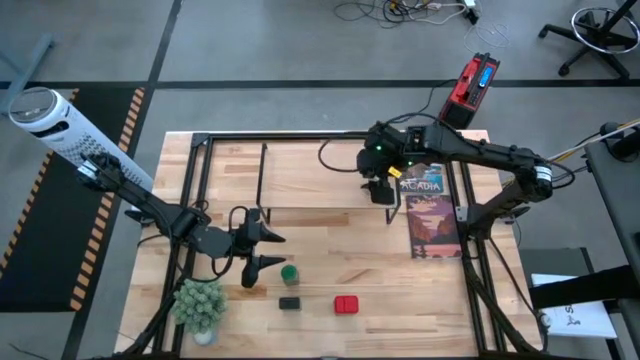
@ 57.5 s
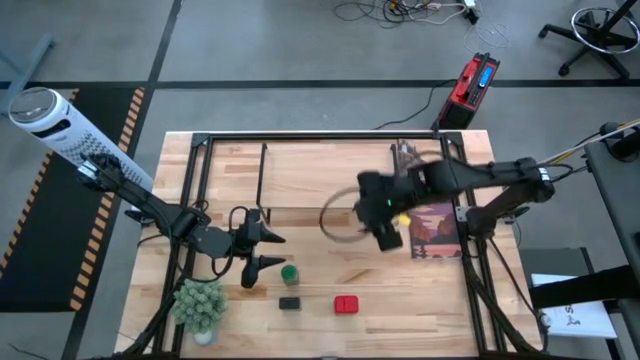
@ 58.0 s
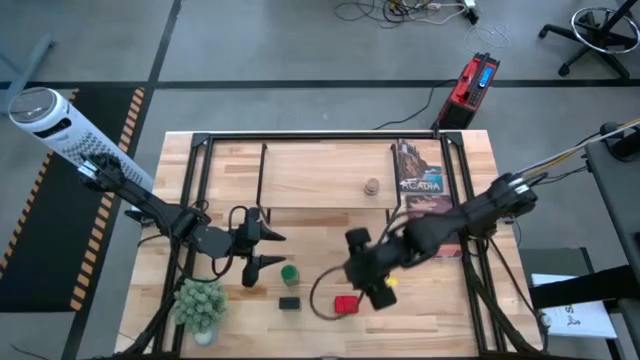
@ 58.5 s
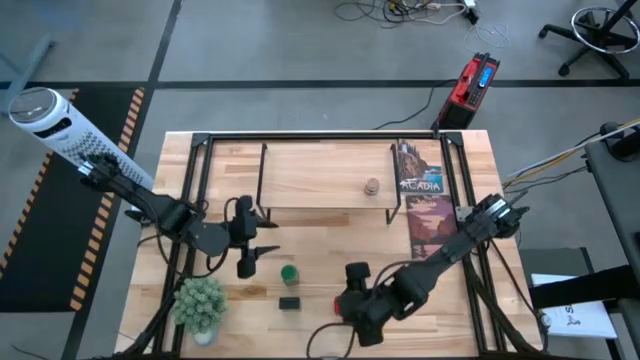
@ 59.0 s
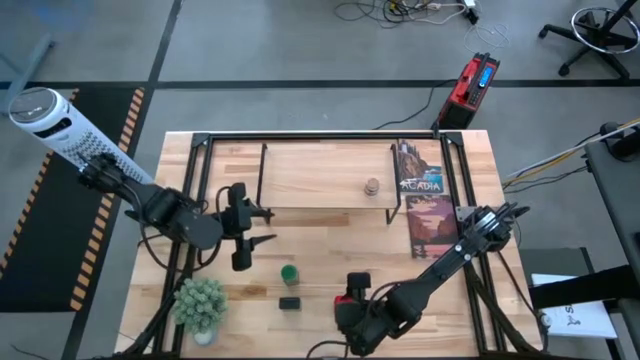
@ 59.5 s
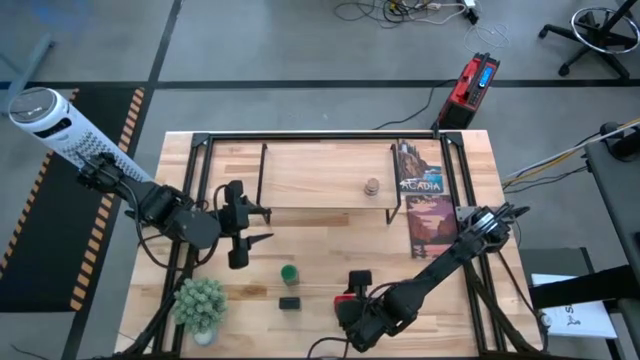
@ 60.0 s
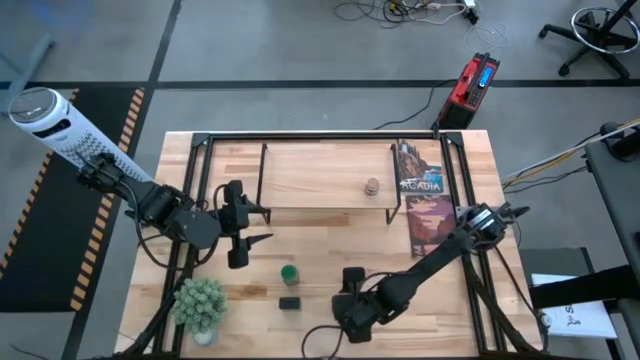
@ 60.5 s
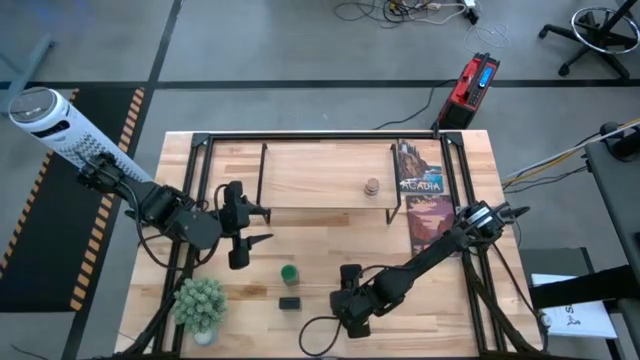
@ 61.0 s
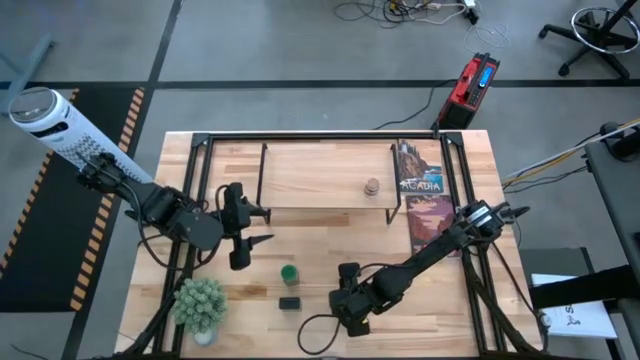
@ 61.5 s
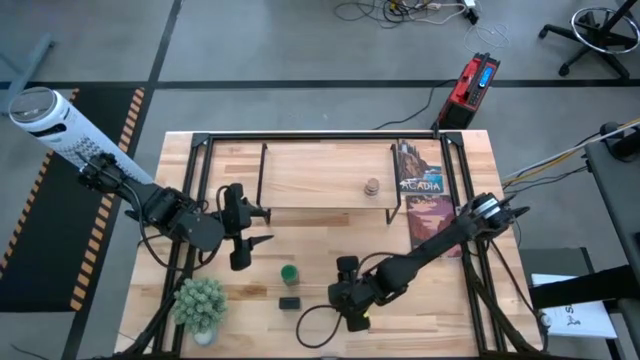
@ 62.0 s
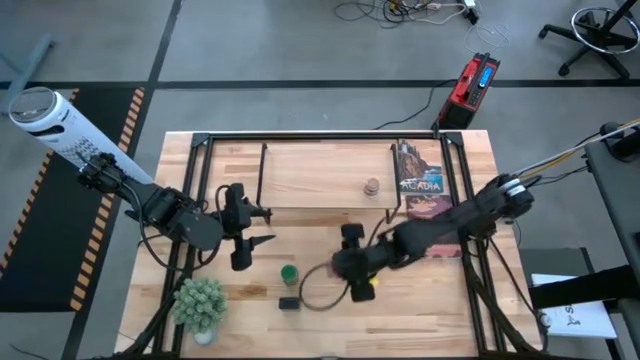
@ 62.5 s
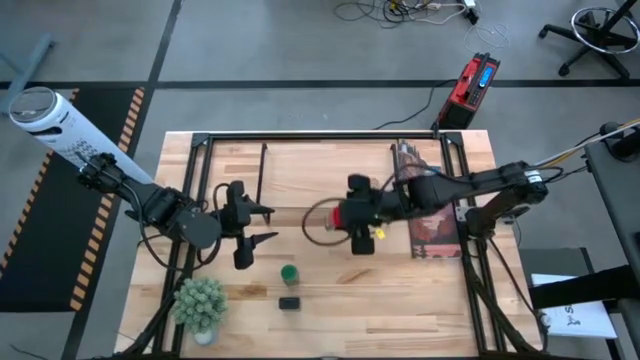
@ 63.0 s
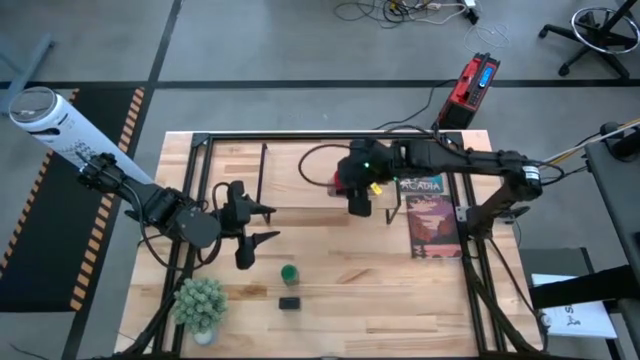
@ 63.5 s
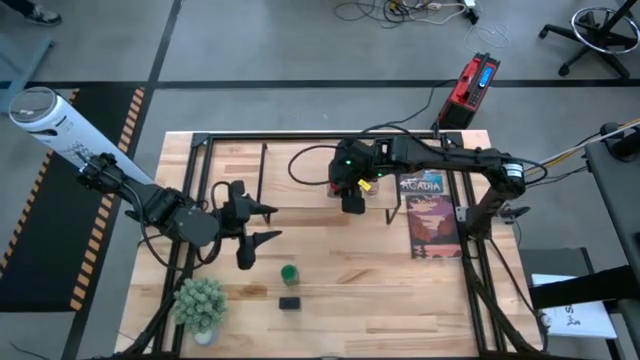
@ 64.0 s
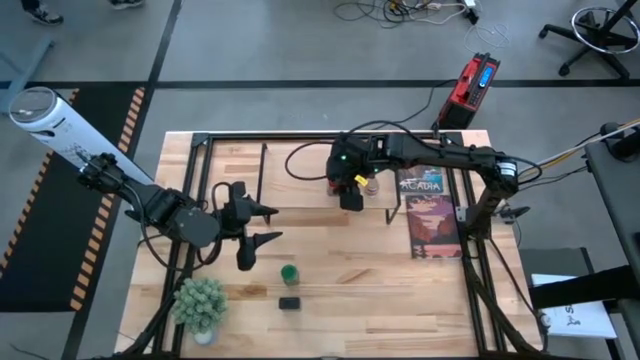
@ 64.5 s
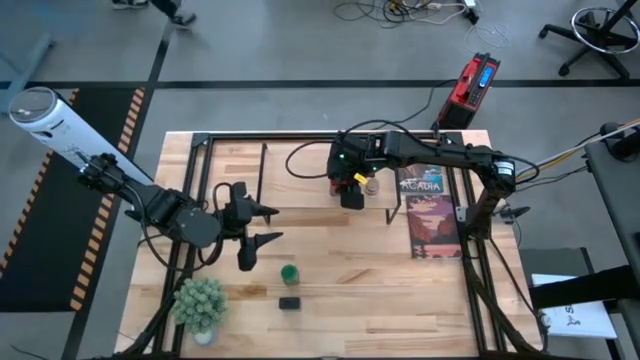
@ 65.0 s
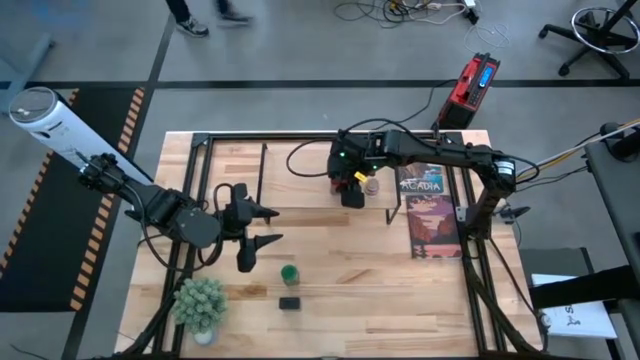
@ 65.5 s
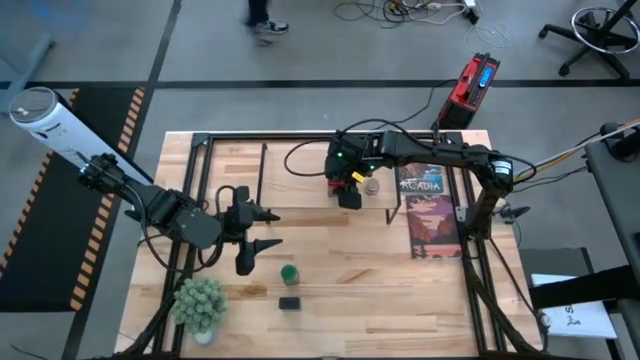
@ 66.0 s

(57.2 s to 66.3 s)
Task: Shelf spices
Put the red seasoning can on the shelf

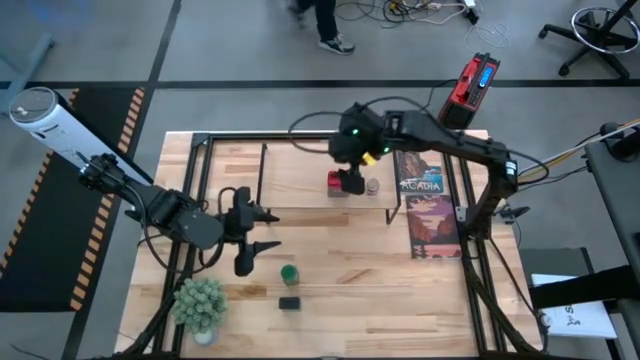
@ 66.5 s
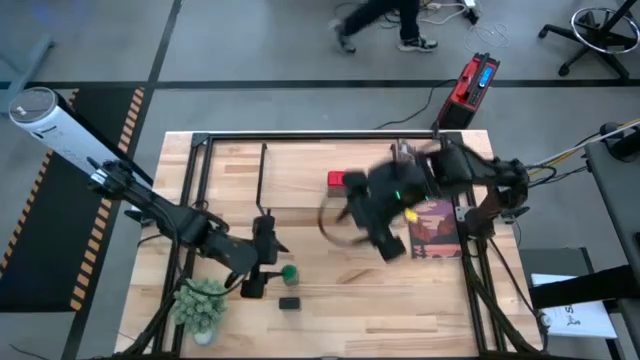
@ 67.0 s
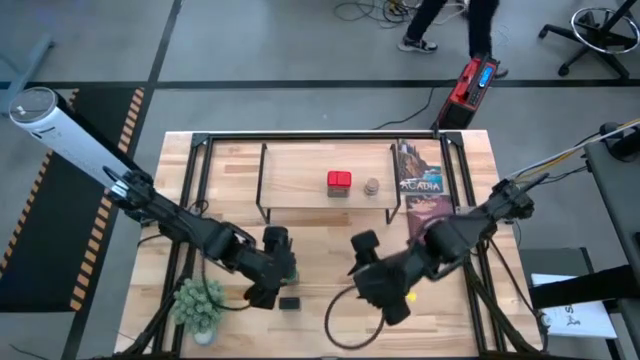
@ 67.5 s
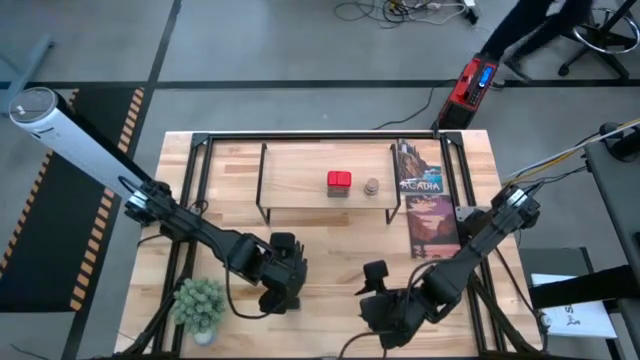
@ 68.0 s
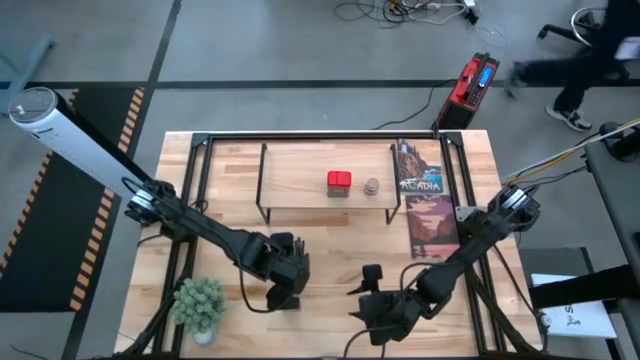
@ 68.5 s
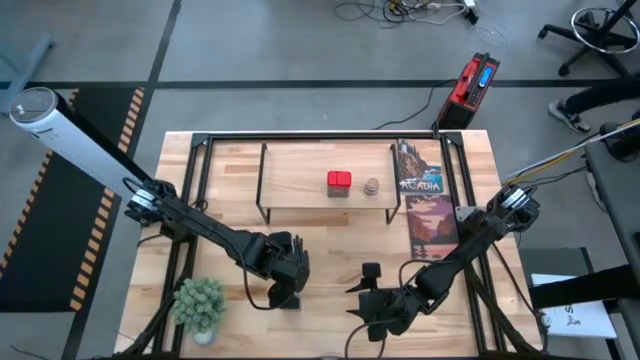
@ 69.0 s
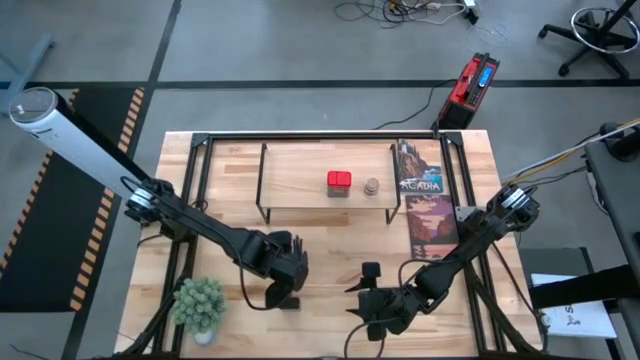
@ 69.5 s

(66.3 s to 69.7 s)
Put the green seasoning bottle on the shelf

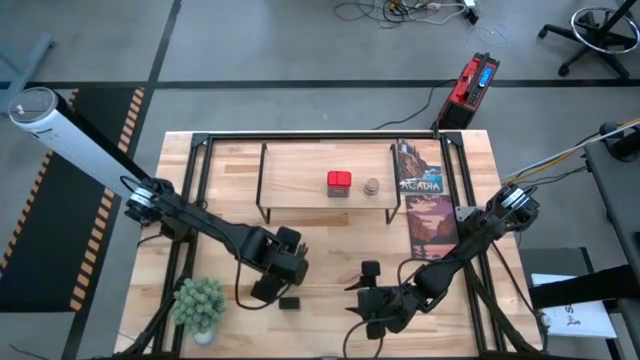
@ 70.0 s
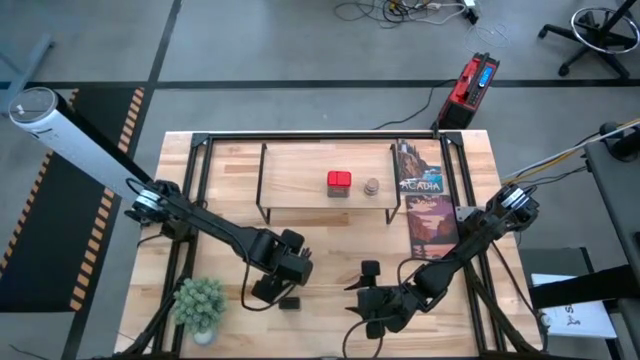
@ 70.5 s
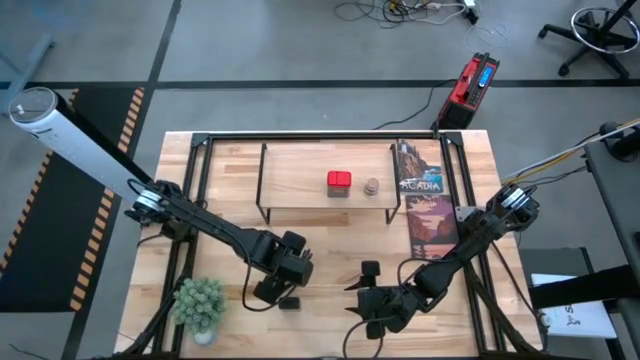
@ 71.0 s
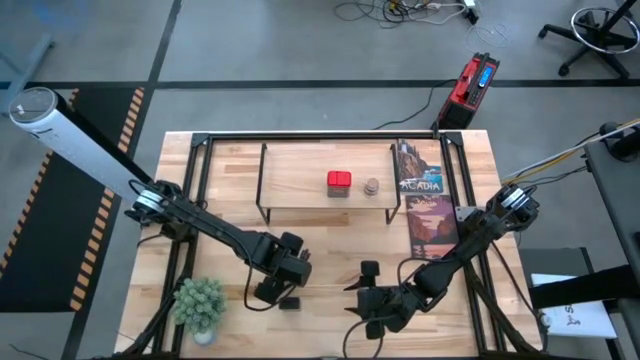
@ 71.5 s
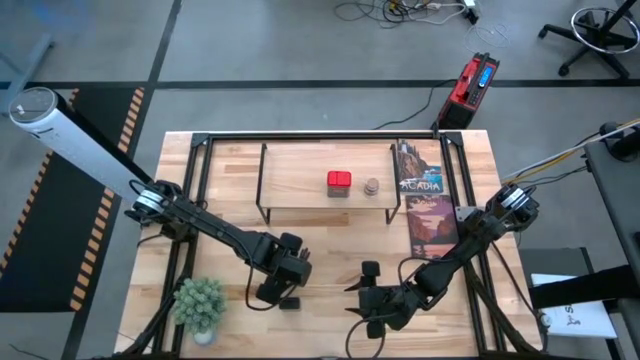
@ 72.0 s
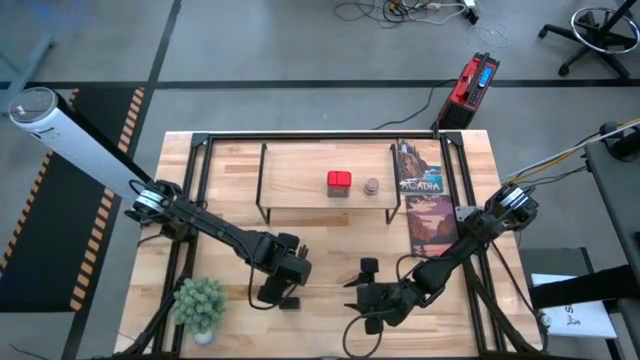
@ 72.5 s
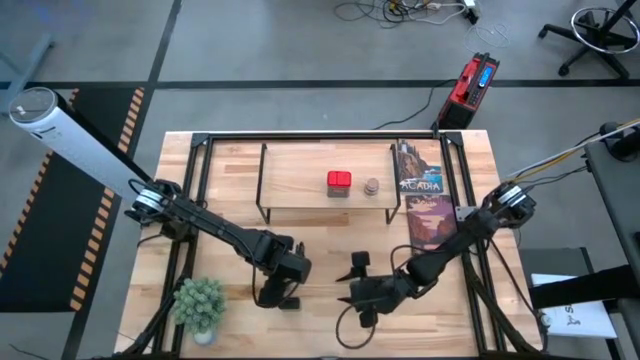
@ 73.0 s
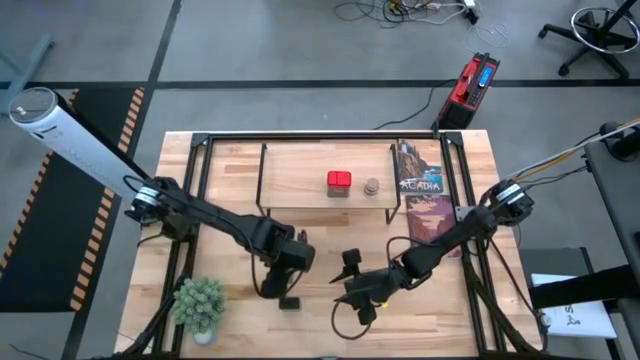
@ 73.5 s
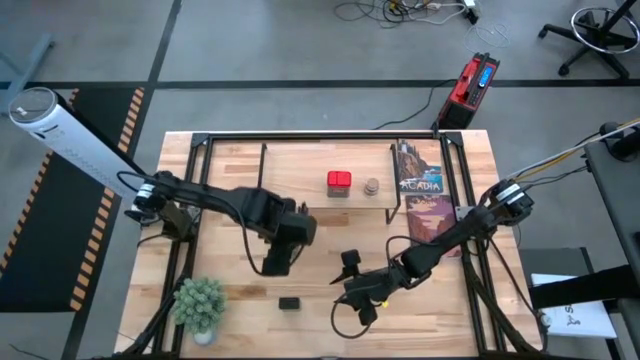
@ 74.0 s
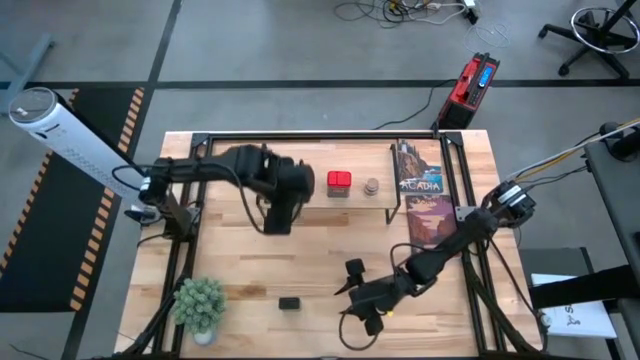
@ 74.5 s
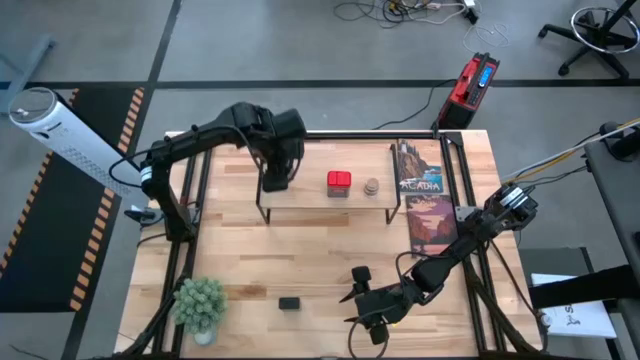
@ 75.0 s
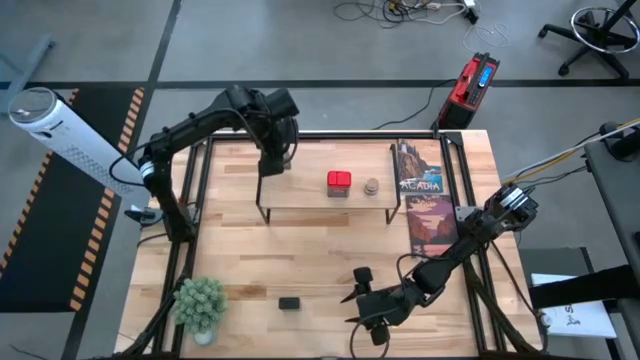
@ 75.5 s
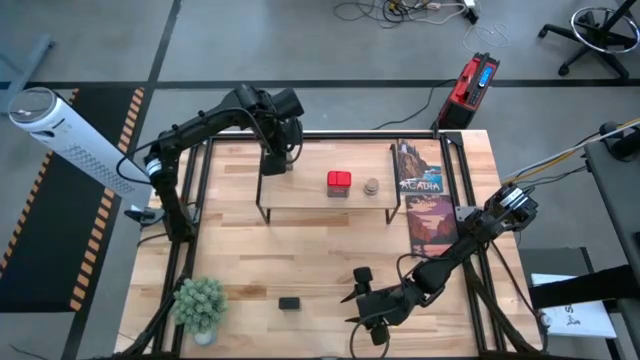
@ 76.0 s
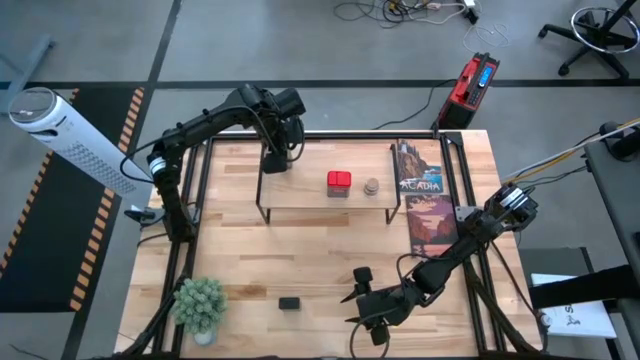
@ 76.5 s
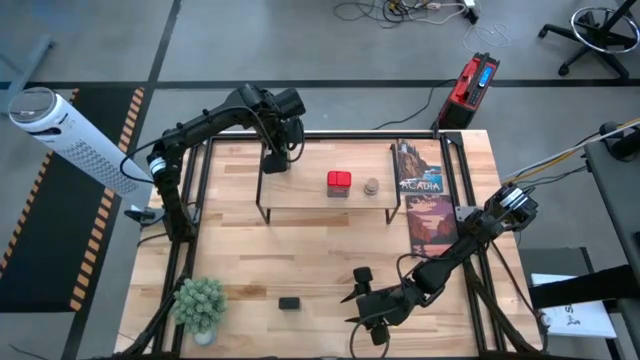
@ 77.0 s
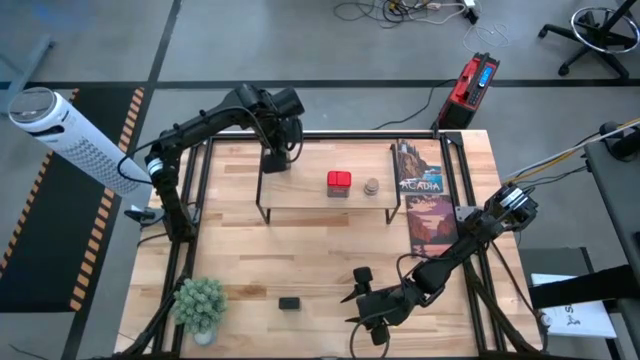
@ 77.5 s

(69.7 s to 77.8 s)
Put the green seasoning bottle on the shelf

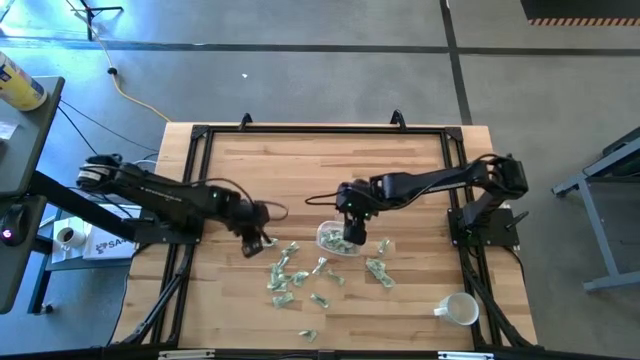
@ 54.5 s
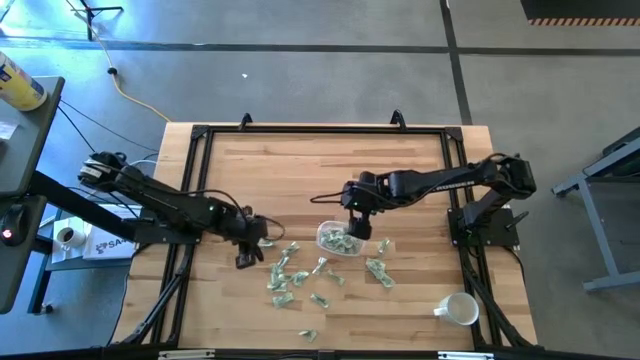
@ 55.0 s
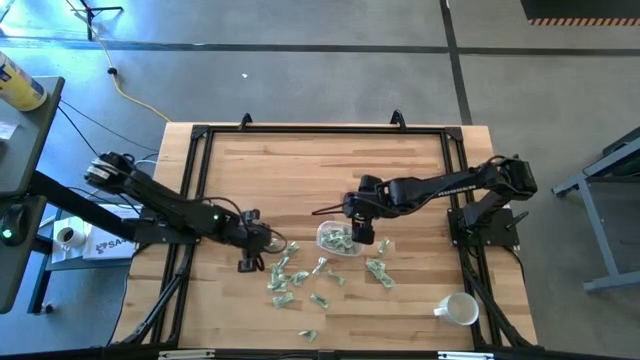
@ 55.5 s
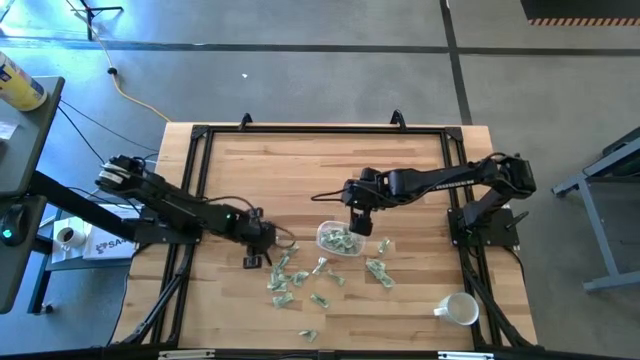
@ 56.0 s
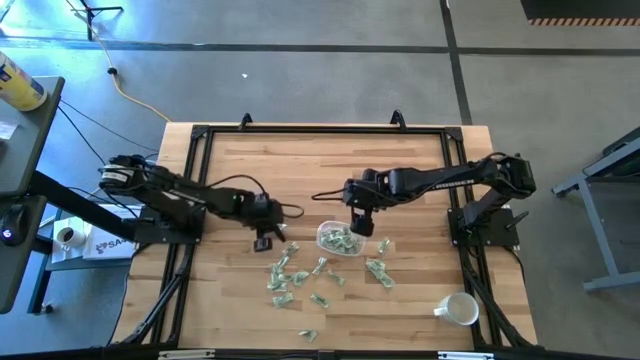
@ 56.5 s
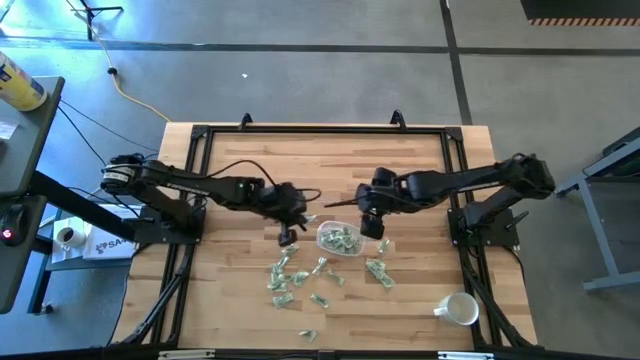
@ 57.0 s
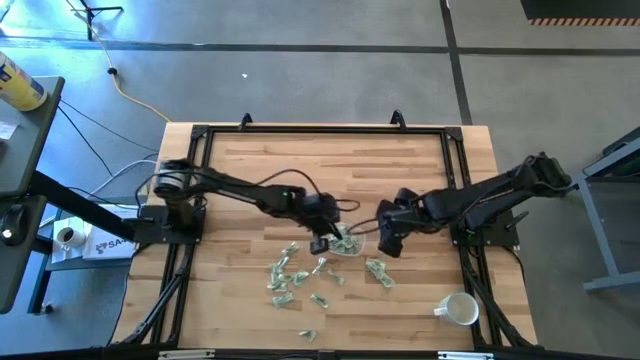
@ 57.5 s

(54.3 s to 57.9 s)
Task: Pick and place Stevia / Truvia into bins
Put the green stevia packet into the transparent container
